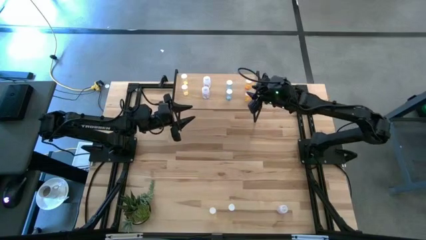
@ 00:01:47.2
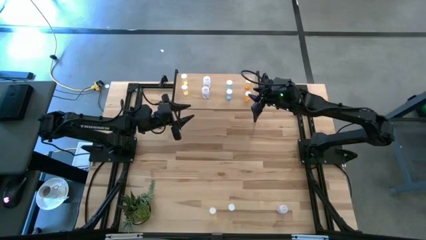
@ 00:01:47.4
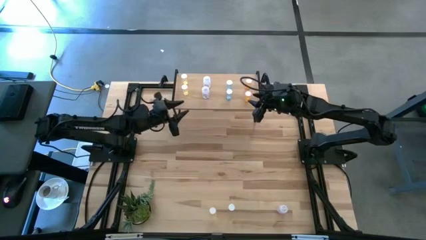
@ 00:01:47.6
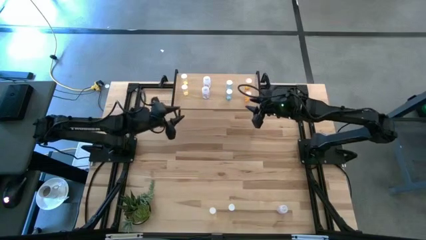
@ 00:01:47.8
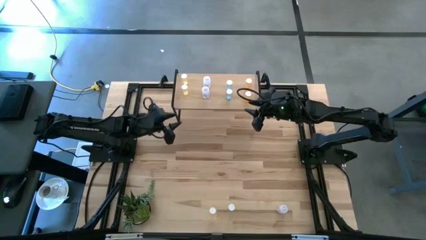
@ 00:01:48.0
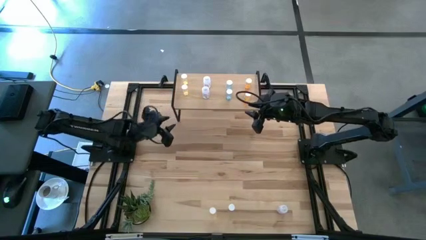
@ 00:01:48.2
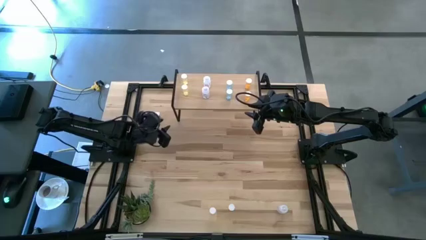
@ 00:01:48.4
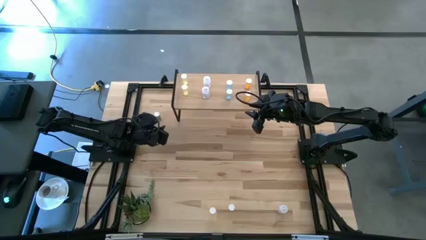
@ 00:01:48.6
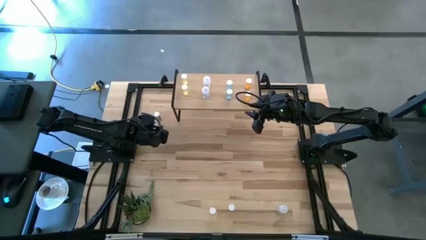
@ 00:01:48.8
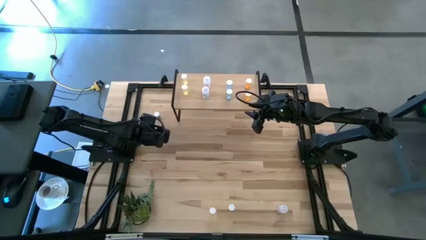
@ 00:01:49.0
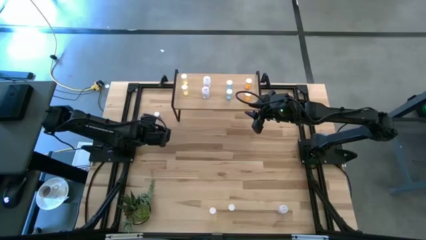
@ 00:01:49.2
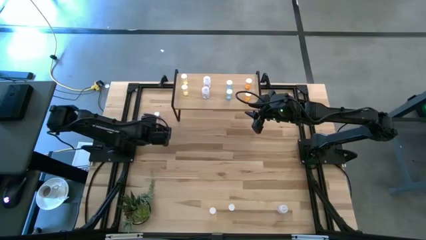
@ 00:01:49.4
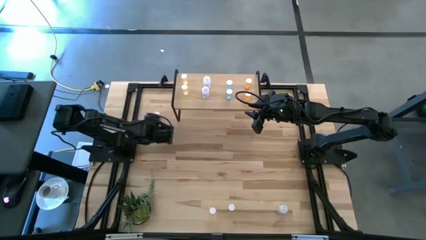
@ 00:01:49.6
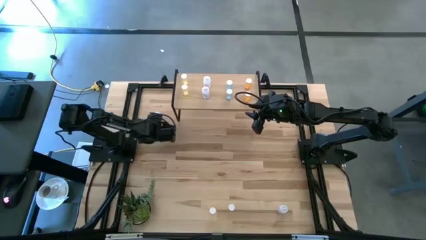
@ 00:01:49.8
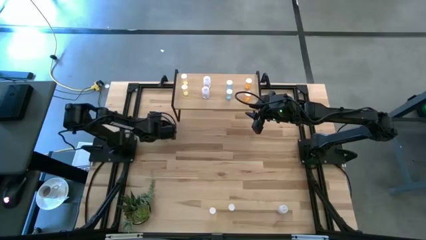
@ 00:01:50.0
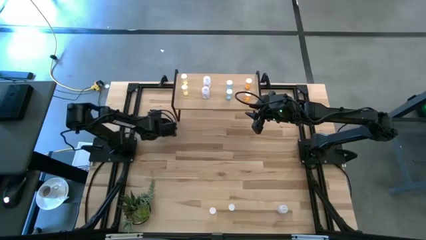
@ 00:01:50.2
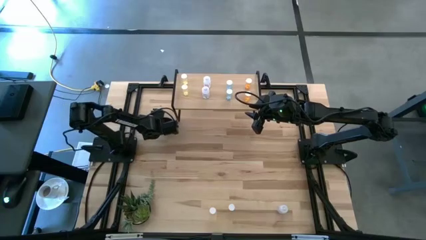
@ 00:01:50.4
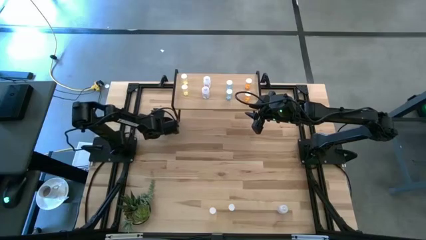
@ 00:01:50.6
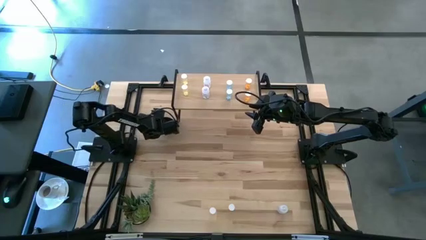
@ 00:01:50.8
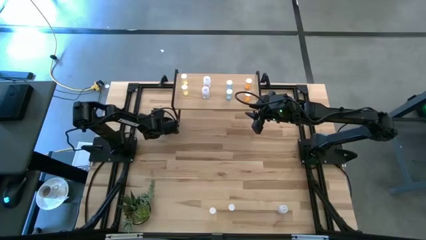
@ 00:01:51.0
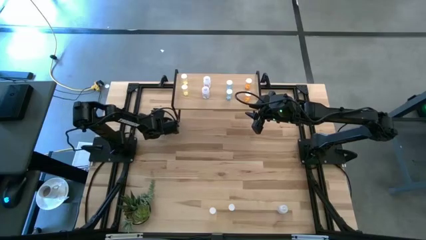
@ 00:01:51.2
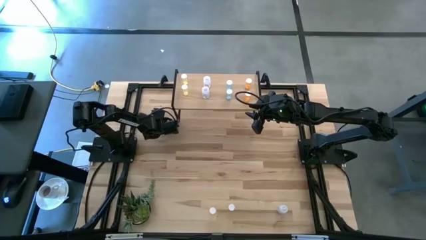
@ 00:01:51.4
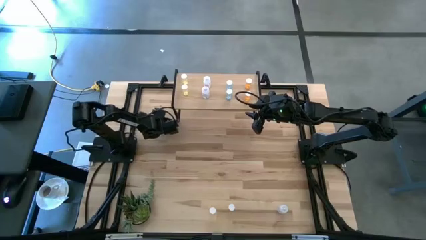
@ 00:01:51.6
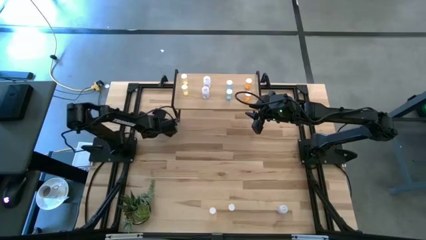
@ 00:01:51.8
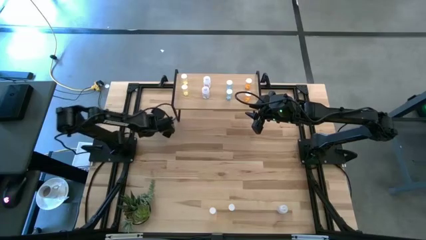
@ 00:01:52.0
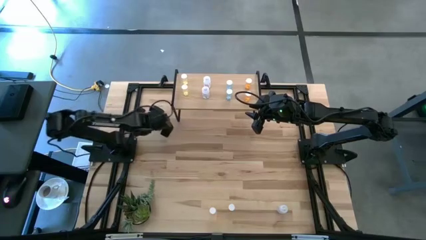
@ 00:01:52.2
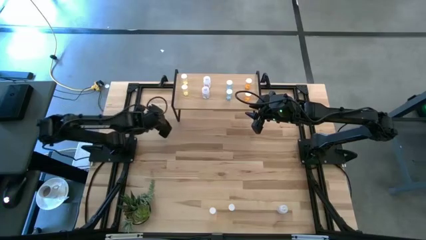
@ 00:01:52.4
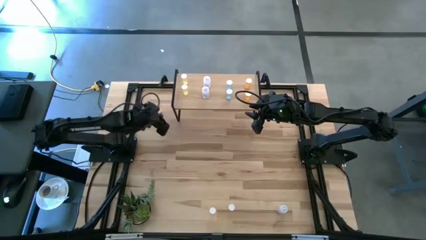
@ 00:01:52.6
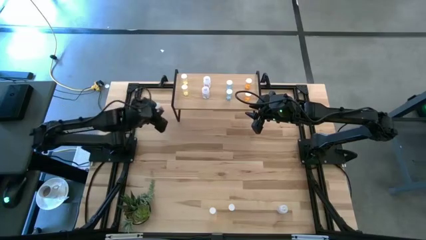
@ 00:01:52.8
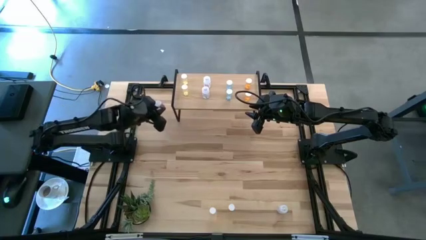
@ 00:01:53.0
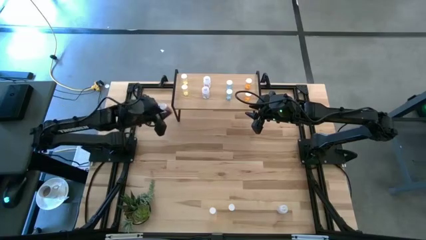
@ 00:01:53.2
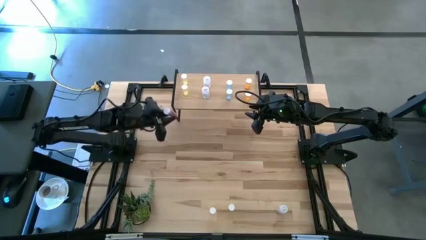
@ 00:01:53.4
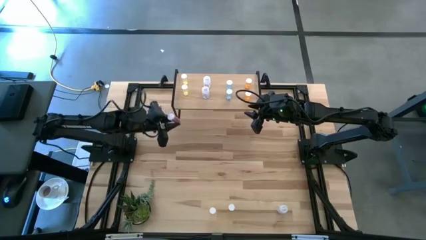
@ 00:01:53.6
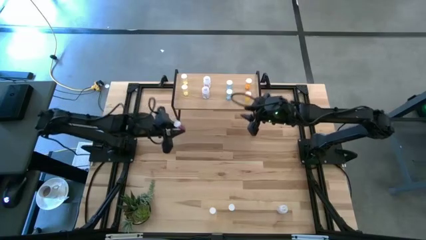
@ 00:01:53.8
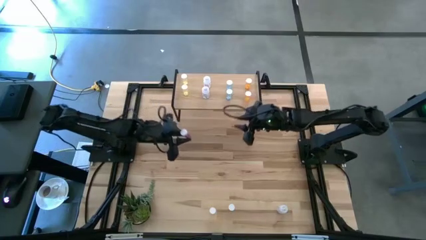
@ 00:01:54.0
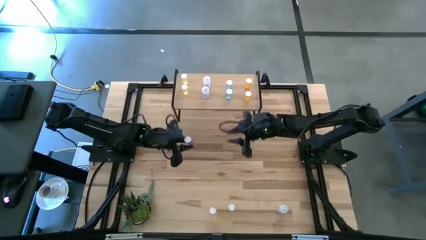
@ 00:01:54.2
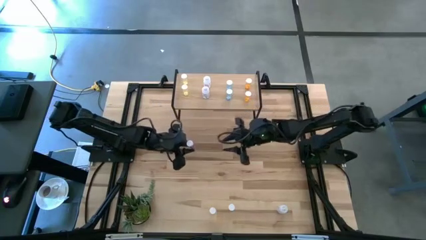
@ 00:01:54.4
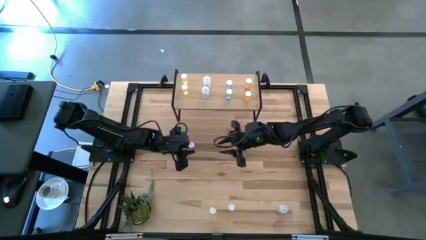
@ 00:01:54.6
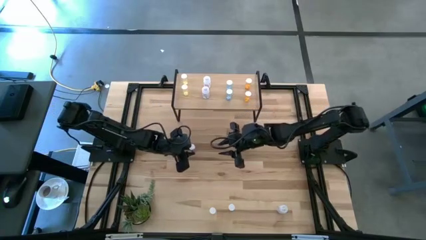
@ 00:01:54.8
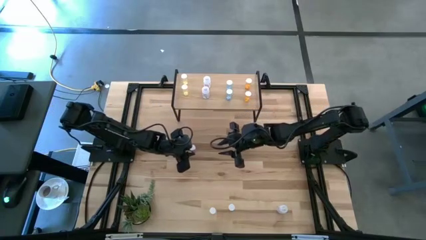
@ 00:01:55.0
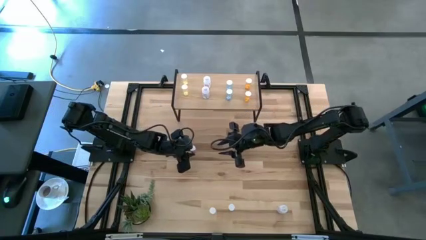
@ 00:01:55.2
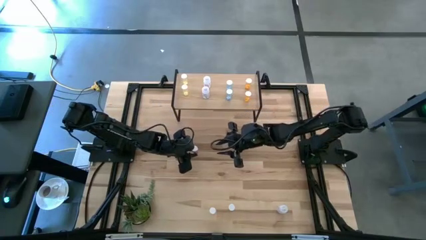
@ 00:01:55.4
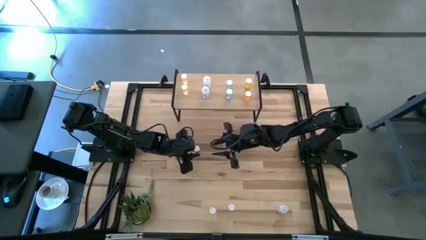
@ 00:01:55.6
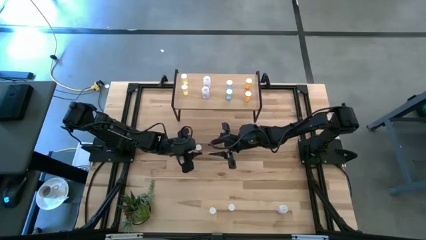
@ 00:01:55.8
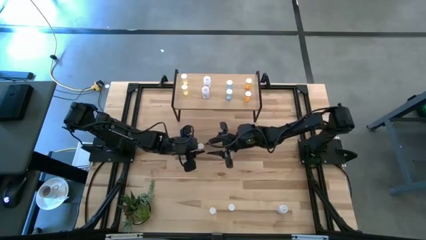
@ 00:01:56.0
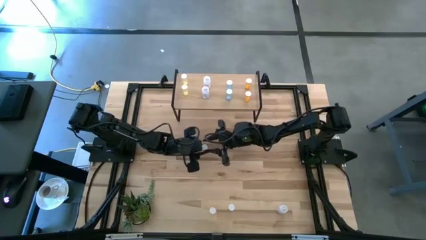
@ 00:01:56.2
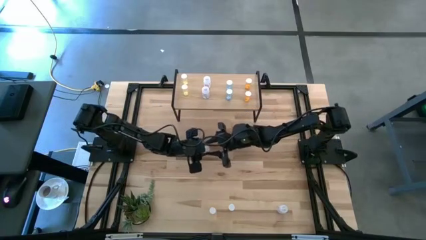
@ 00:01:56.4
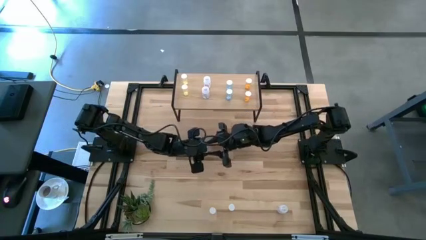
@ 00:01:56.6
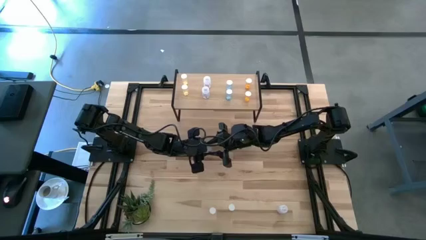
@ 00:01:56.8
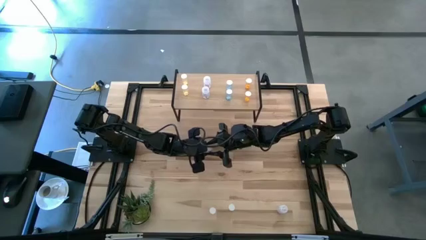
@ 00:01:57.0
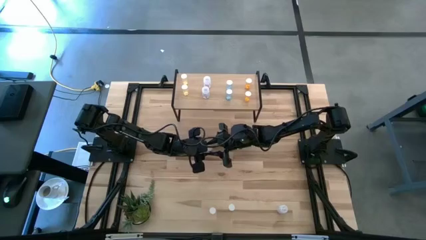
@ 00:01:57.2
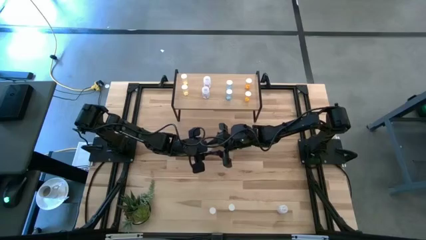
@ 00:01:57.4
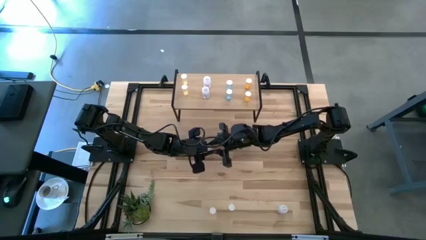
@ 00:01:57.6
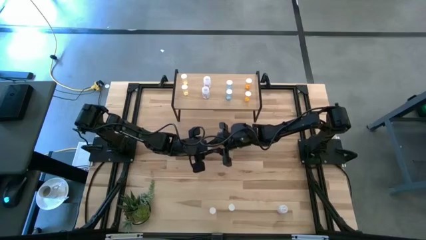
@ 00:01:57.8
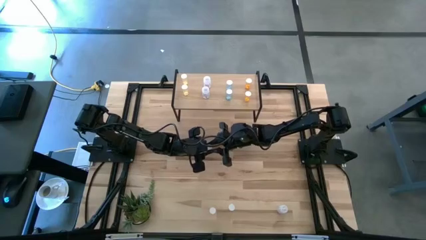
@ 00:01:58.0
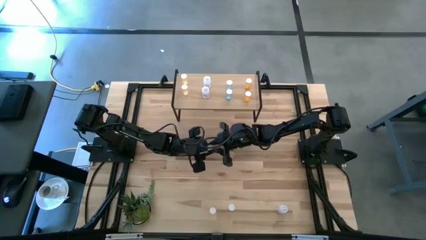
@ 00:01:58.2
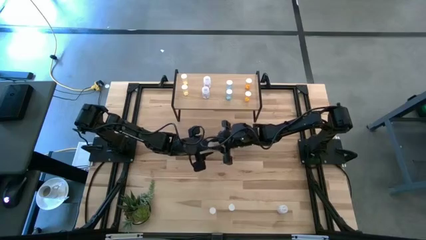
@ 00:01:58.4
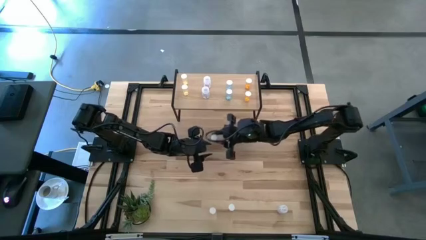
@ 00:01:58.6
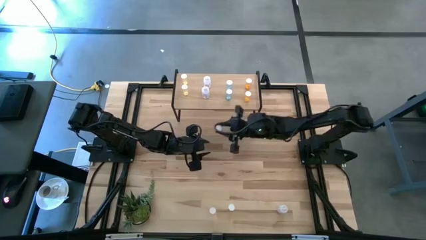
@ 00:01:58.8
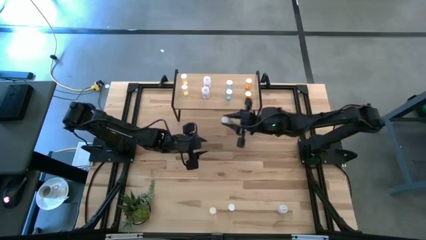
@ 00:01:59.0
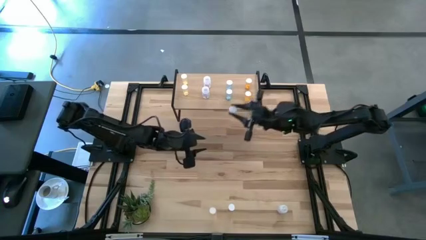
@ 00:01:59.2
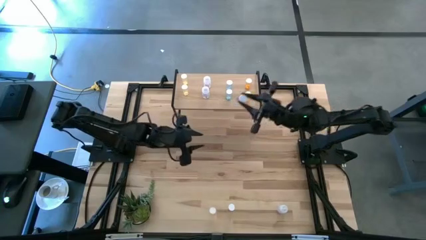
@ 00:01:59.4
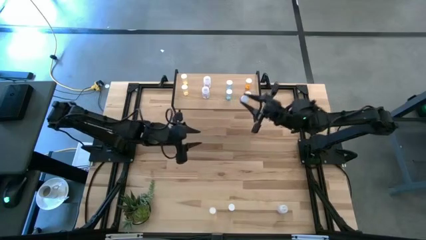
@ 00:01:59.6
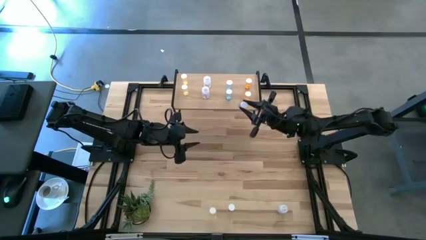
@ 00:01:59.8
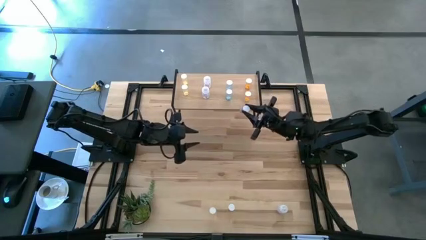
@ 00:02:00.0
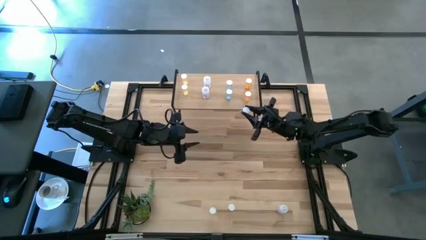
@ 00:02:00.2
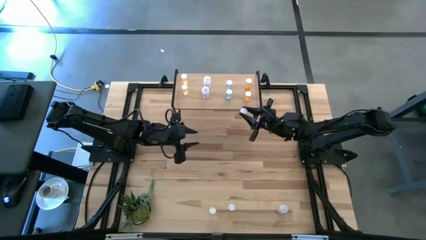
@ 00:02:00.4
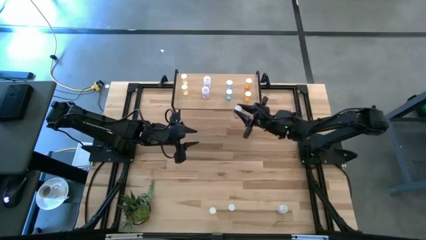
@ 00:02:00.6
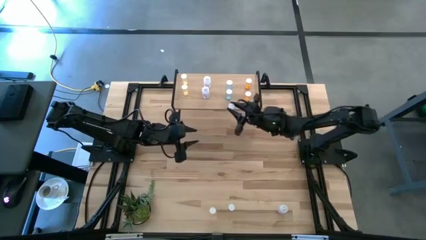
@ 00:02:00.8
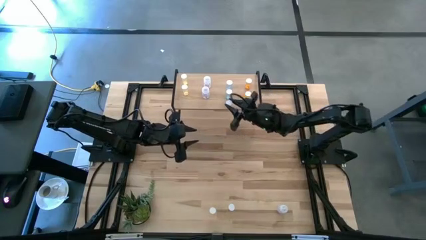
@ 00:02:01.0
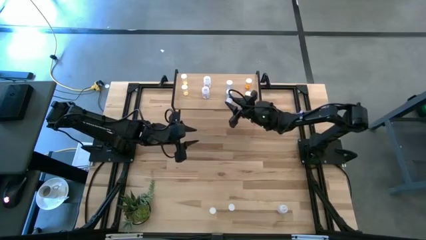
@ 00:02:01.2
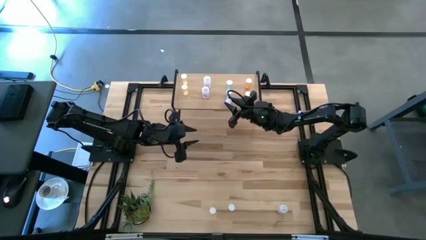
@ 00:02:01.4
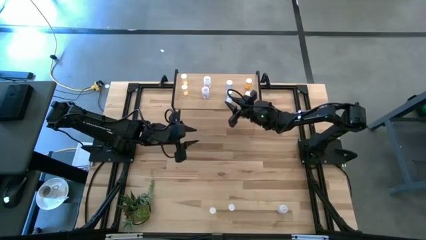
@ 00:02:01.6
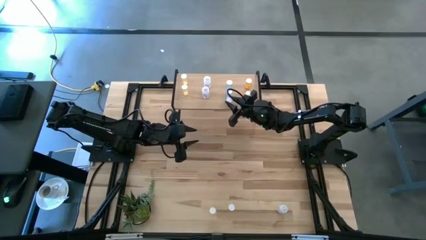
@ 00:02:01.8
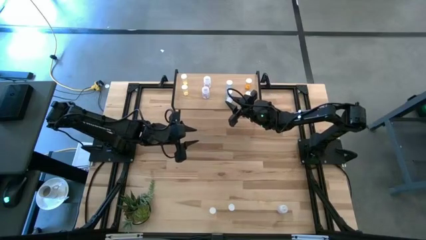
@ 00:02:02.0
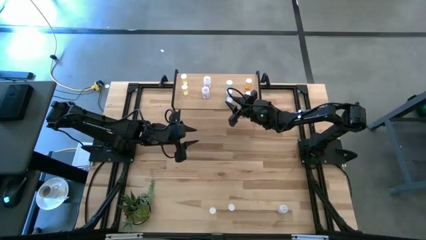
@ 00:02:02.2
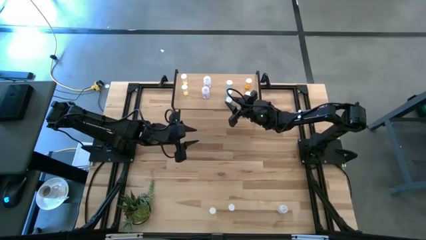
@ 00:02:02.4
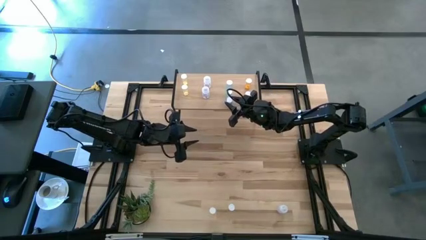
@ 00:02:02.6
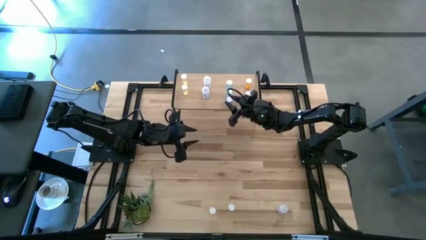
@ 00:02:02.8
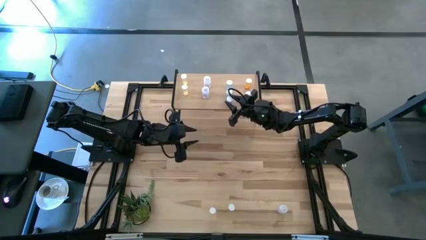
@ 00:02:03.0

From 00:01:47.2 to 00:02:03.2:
Task: Pick and place medicine bottles onto shelf by color
Put the blue pill bottle on the shelf aligned with the blue pill bottles

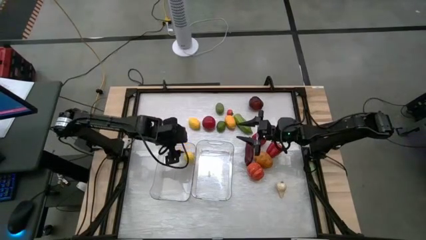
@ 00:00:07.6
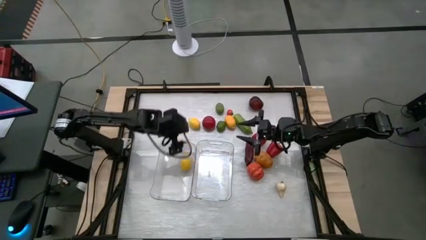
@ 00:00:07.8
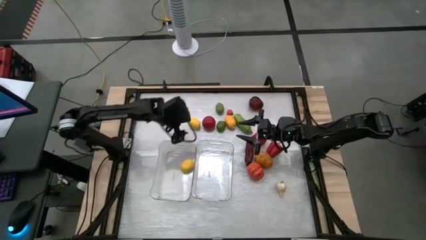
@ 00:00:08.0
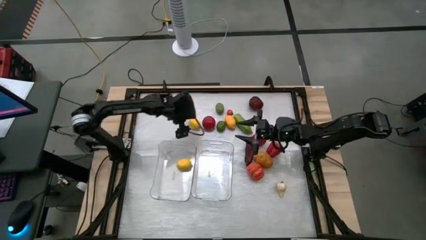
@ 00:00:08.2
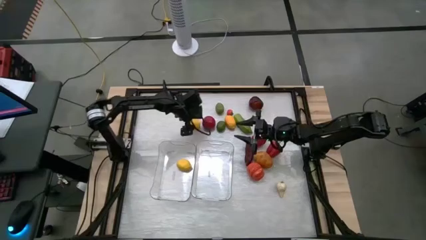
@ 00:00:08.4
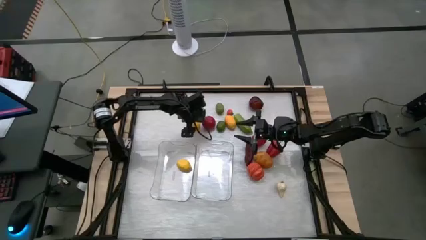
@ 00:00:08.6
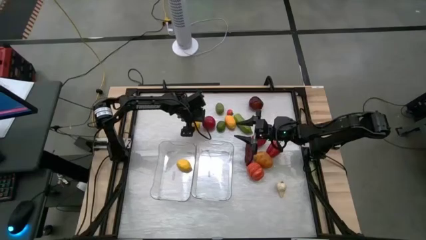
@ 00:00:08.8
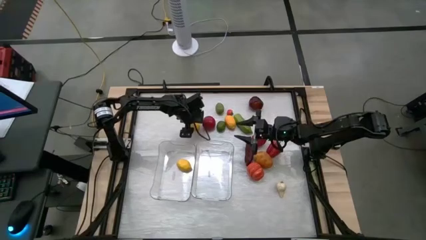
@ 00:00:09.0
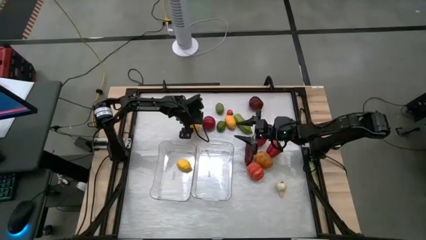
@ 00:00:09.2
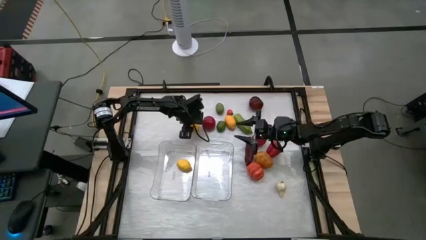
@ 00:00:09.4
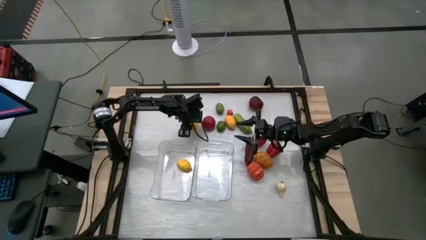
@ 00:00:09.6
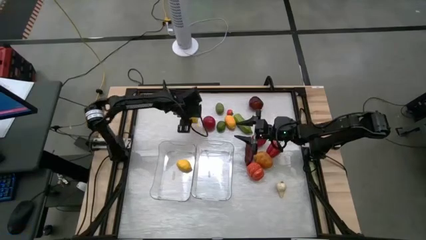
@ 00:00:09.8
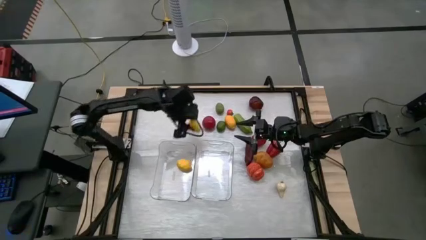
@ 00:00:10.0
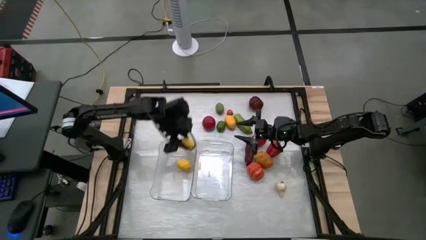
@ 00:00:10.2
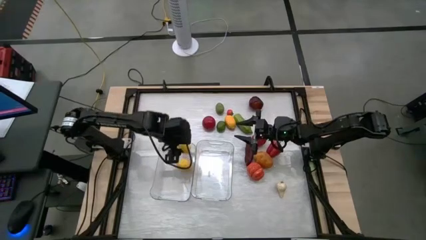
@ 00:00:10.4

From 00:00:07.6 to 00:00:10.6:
Task: Sort produce into baskets
Put the left lemon into the left transparent bin
